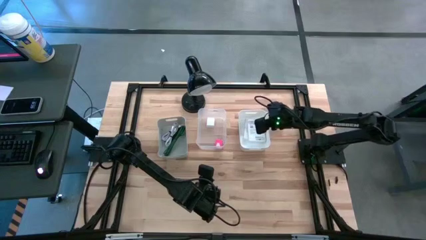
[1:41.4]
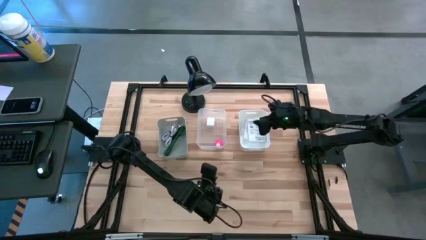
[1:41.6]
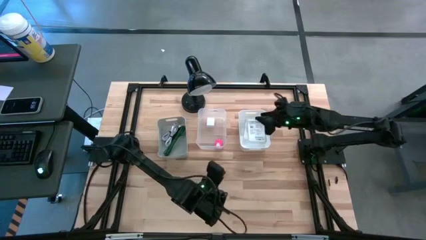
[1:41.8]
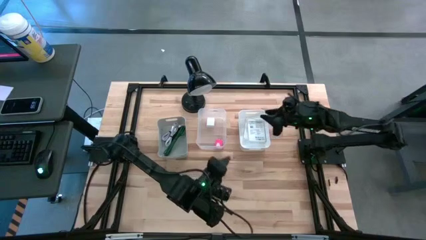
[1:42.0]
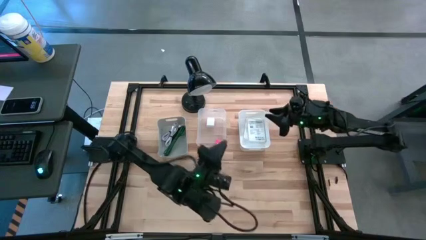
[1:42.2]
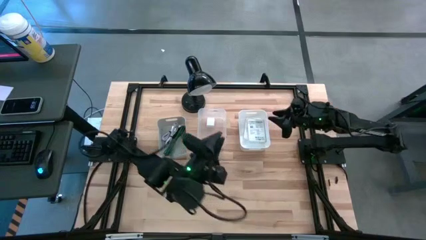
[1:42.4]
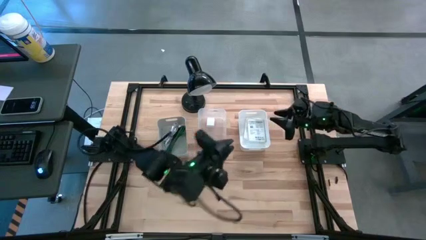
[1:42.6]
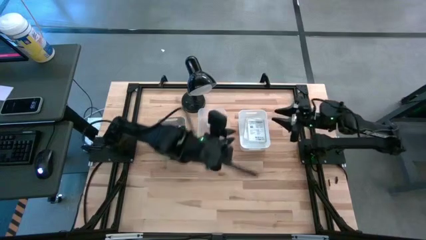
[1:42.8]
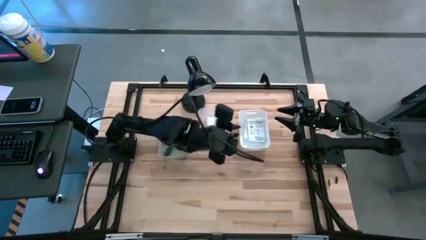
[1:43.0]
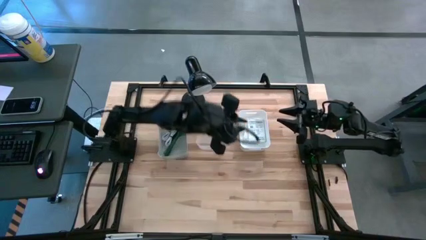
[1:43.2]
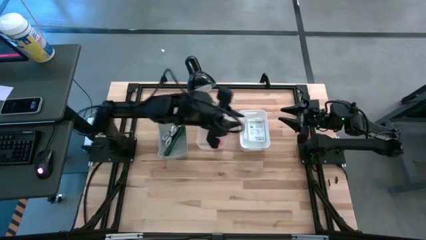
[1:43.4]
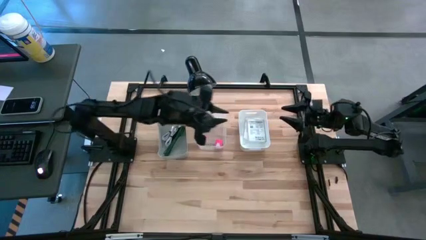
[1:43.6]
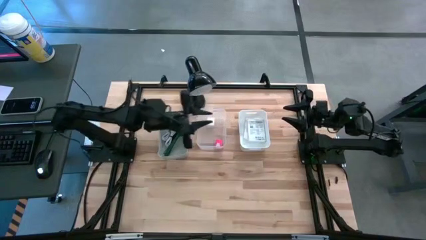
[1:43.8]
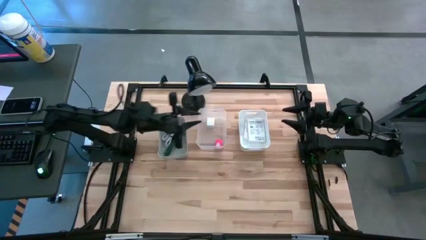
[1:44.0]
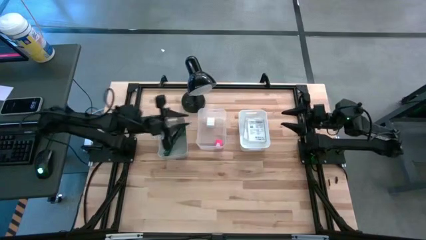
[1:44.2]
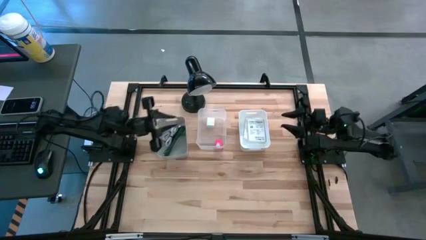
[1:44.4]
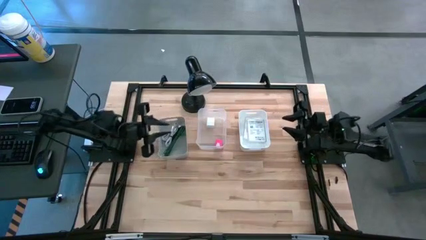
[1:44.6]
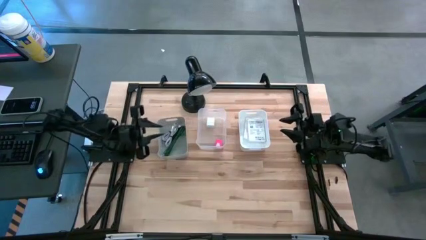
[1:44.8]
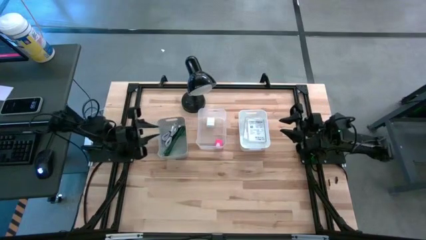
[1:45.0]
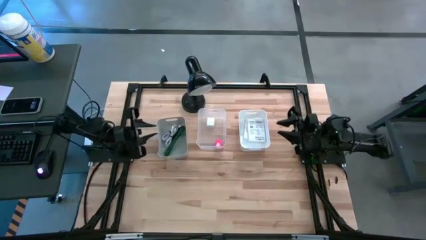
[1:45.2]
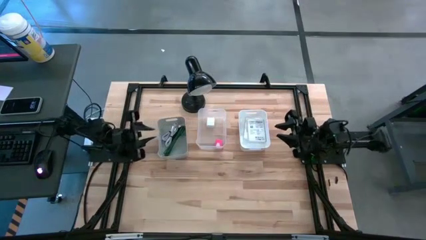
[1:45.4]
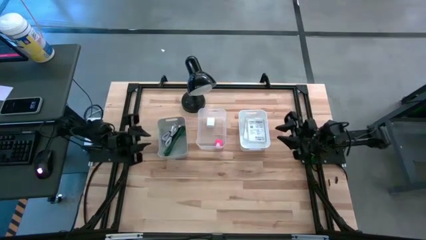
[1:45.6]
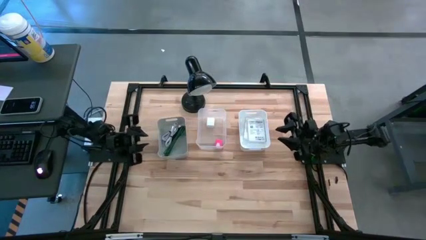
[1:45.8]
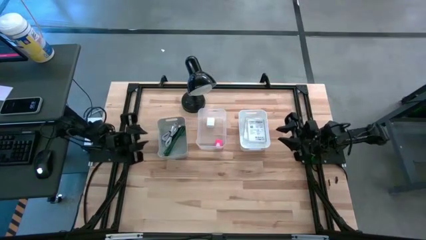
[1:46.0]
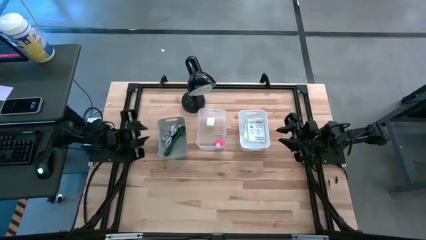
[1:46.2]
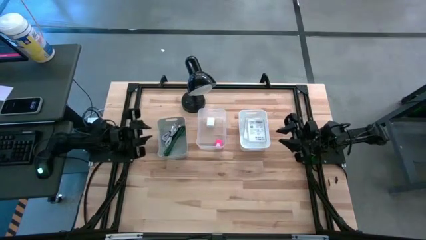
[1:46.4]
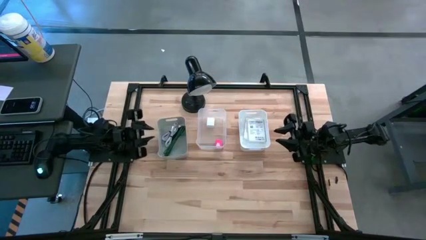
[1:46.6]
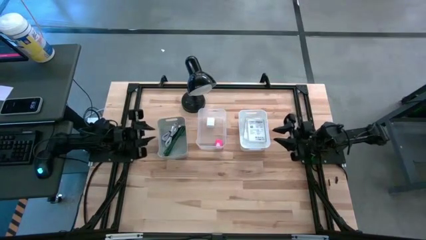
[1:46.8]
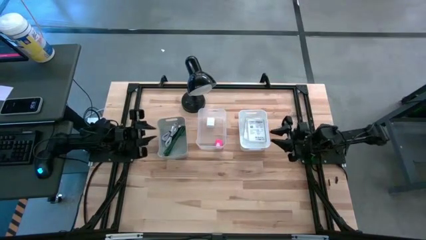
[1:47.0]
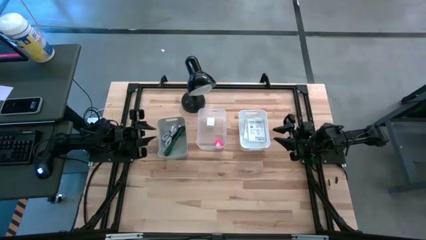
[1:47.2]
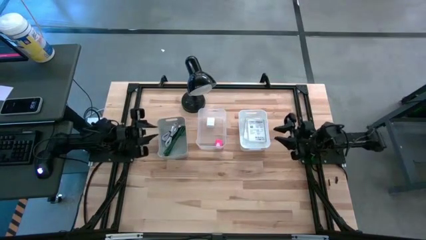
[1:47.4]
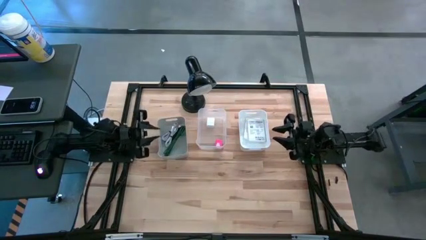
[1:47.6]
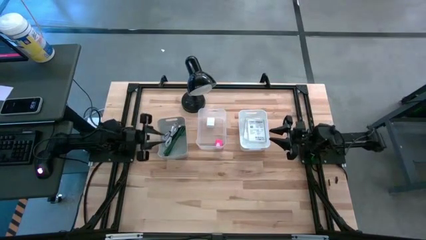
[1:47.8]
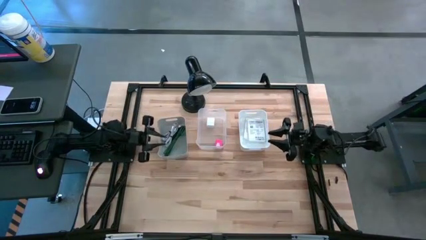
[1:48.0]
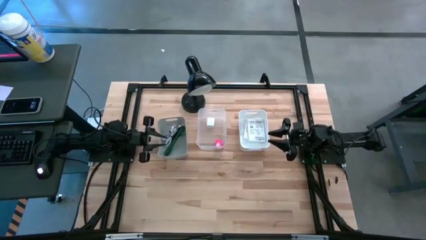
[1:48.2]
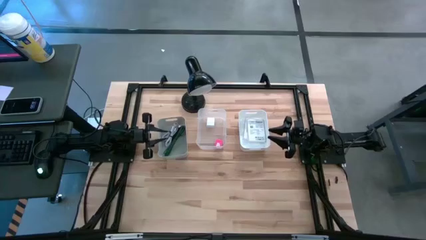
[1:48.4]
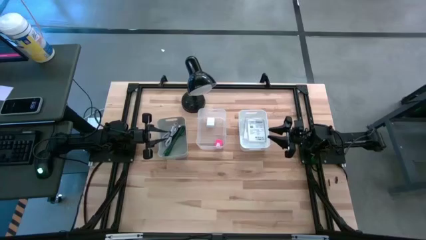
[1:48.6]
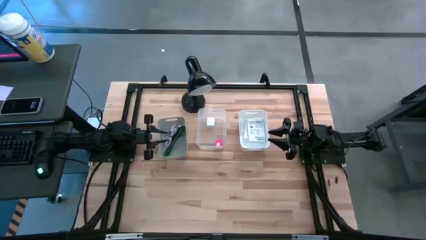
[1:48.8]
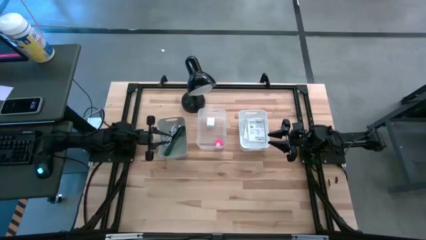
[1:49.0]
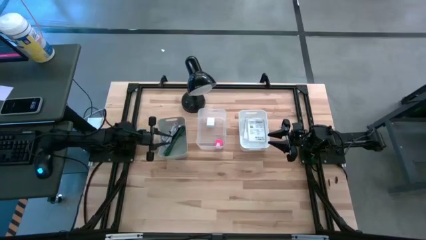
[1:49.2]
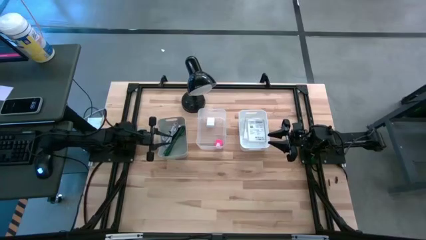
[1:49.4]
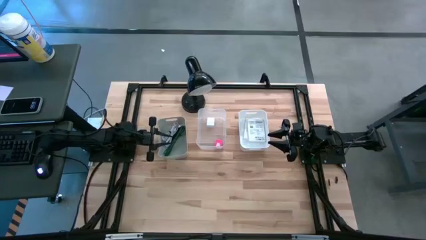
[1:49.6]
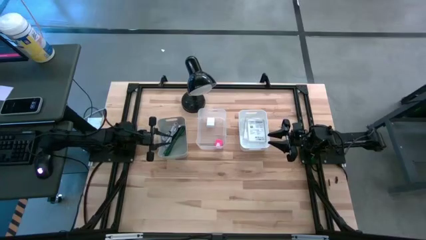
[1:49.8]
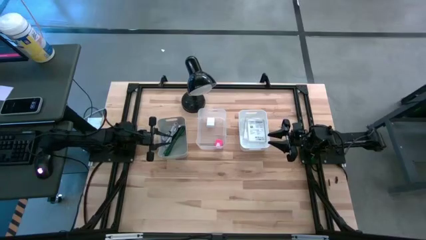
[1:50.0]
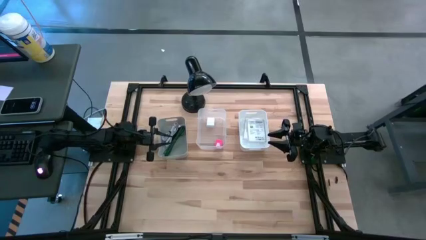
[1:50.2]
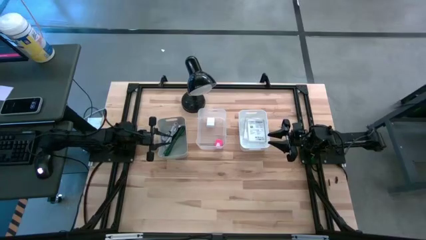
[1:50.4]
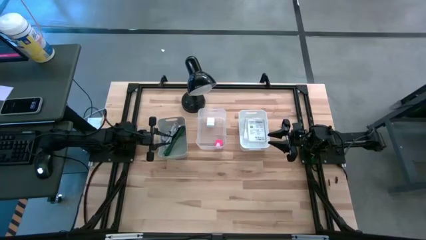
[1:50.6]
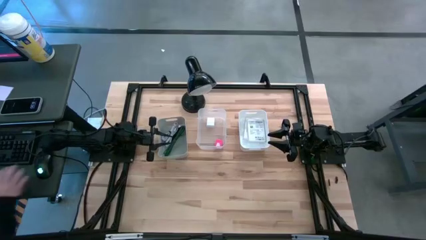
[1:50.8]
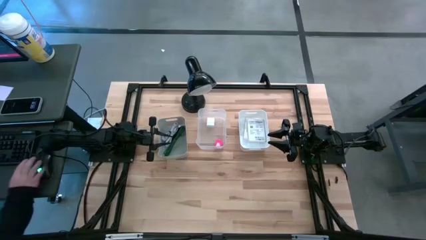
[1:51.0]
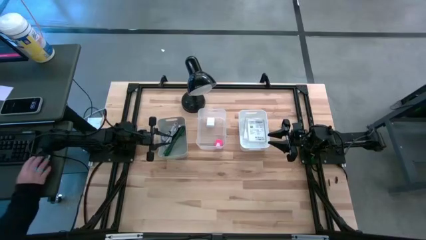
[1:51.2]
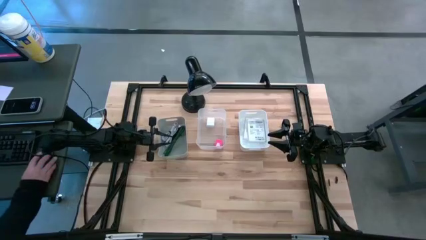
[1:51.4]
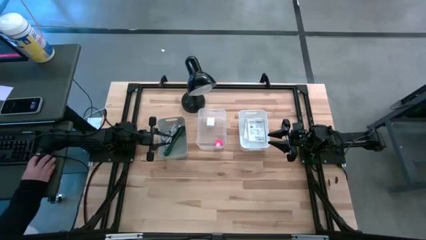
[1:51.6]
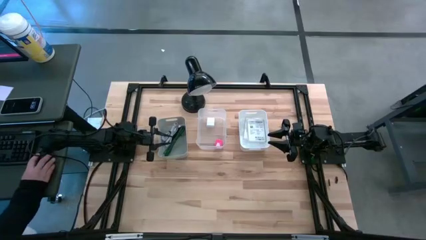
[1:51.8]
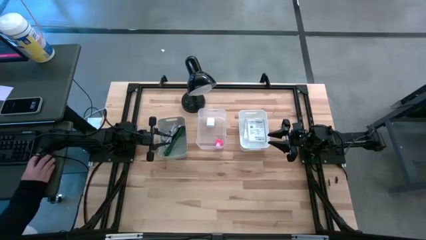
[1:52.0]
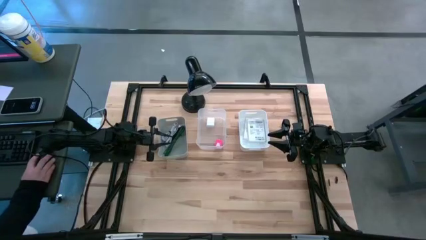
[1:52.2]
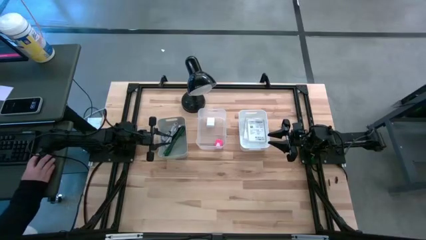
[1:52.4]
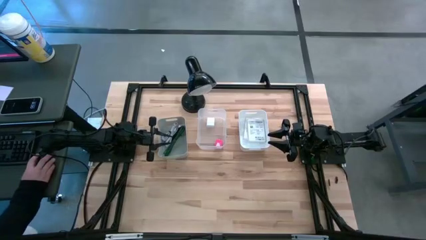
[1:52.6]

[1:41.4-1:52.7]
Task: Pick and place items into bin
Return to Home Position

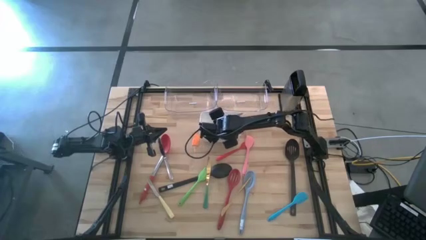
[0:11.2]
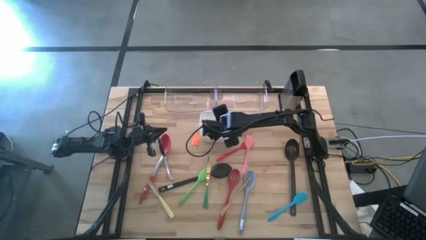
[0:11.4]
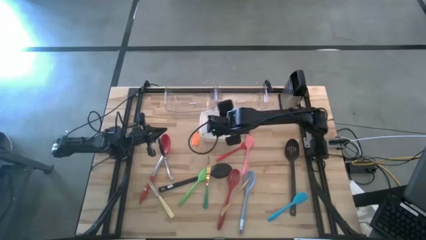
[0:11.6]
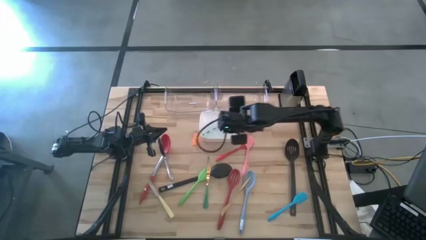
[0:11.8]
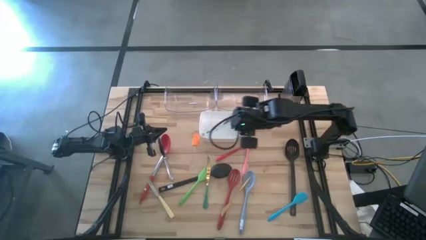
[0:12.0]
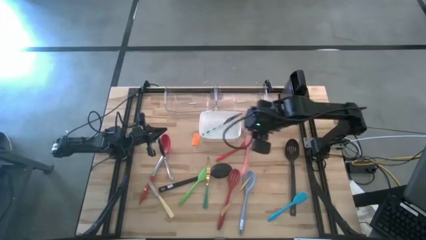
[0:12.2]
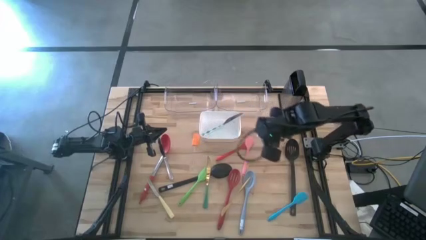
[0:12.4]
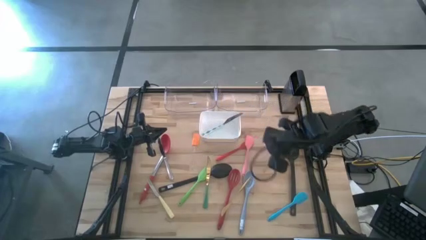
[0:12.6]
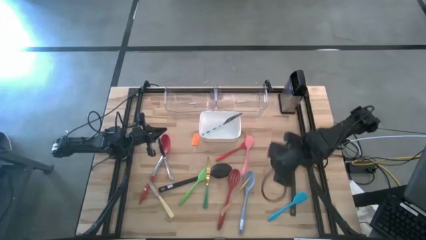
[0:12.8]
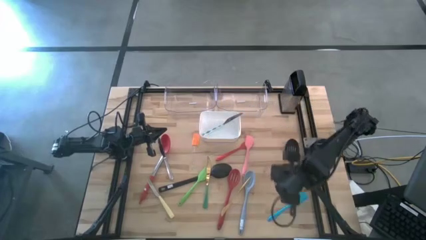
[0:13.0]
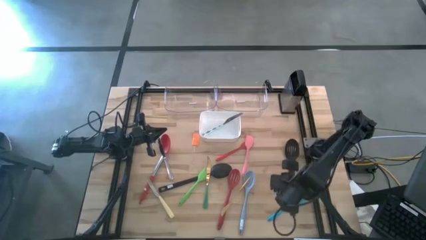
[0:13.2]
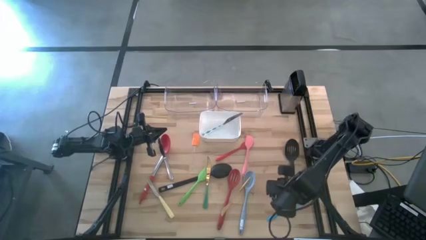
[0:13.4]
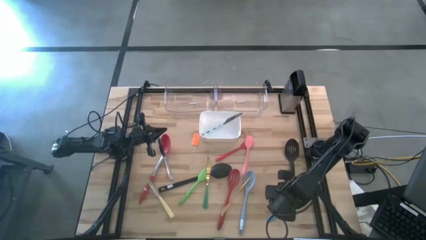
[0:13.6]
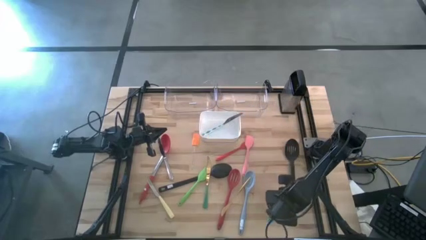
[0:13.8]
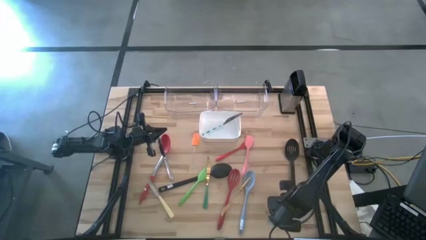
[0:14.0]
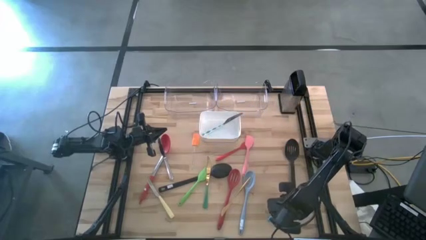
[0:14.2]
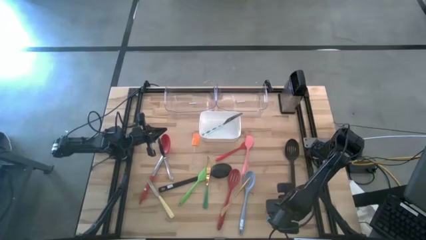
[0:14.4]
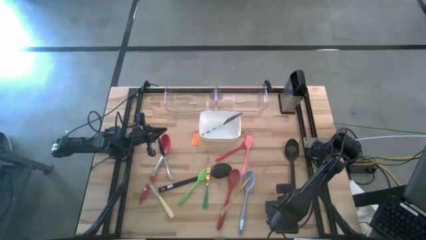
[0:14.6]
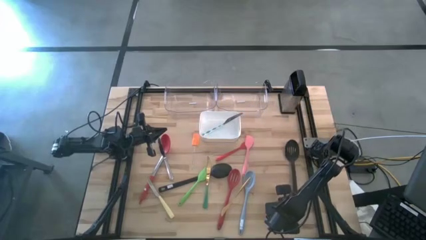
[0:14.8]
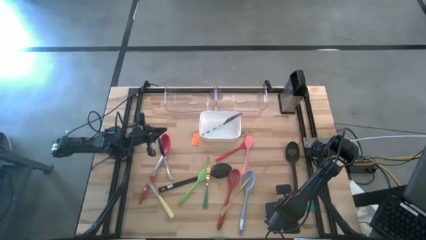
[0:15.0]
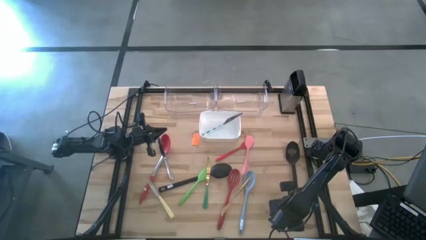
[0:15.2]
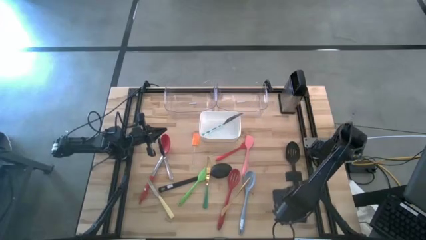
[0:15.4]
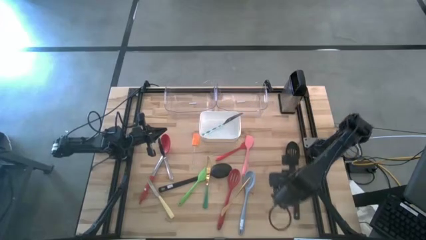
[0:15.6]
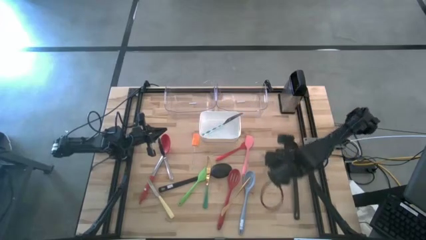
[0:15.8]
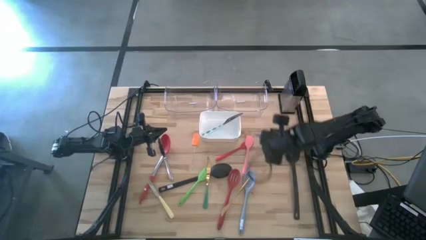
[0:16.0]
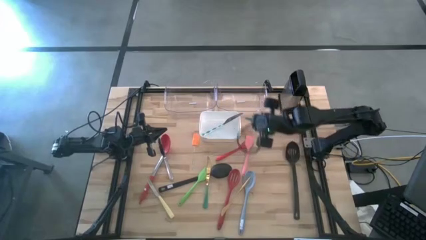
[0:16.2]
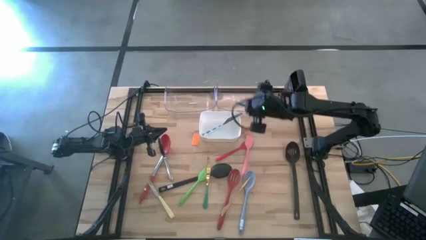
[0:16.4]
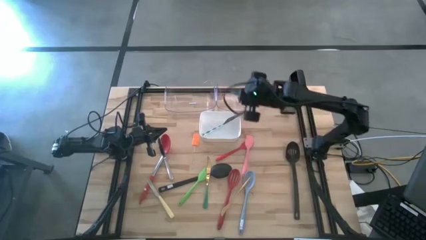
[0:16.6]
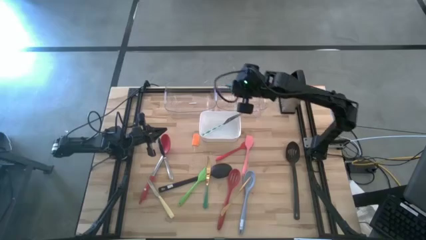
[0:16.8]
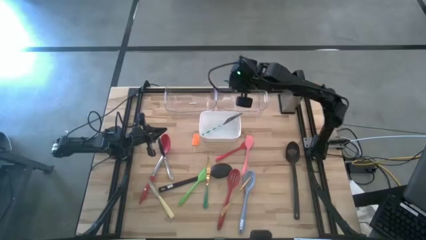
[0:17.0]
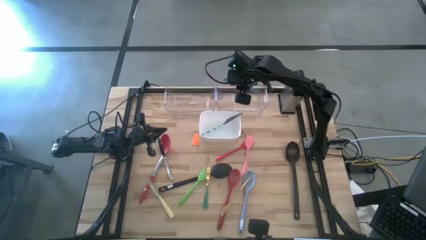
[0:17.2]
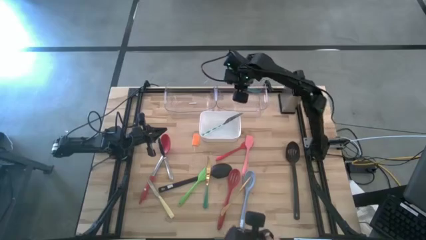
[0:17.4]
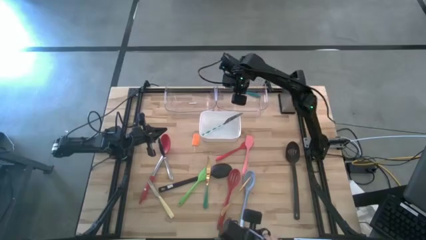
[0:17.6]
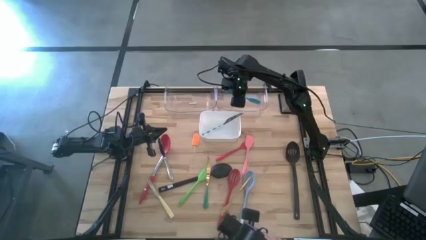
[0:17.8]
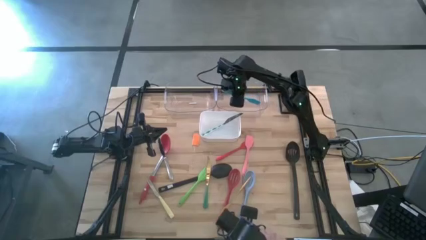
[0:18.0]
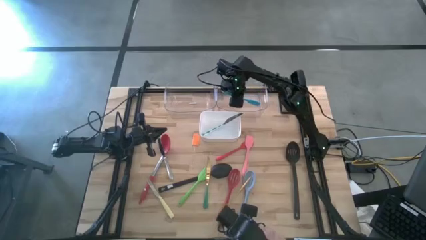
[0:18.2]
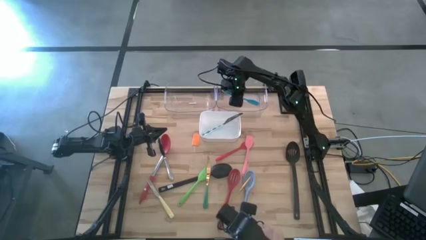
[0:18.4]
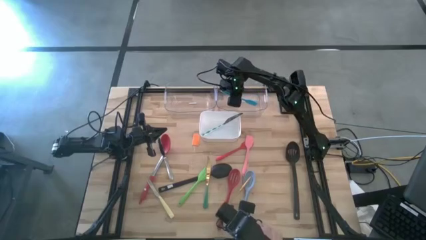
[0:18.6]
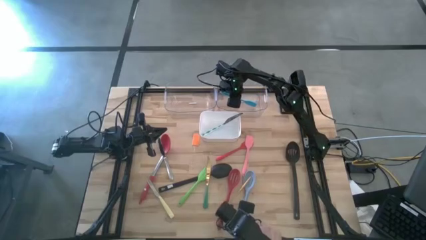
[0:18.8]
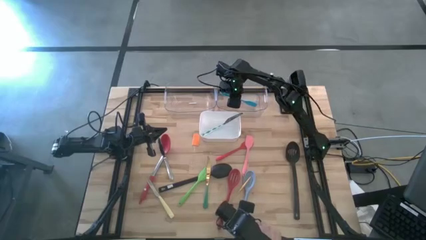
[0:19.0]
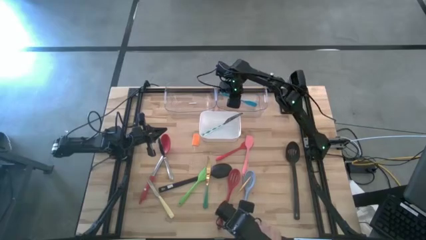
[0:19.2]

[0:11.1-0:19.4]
Task: Pick & Place Kitchen Items
Put the blue spatula into the right transparent bin
